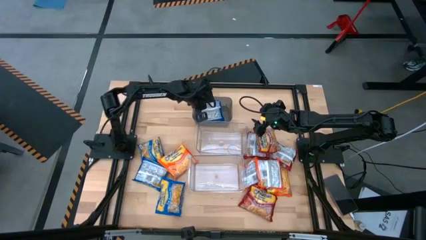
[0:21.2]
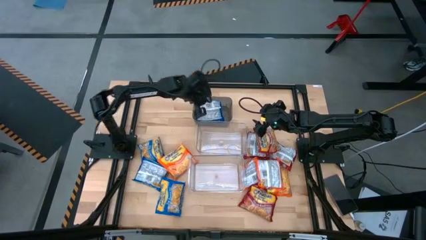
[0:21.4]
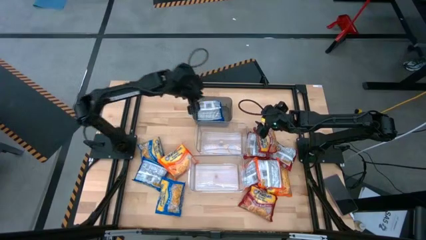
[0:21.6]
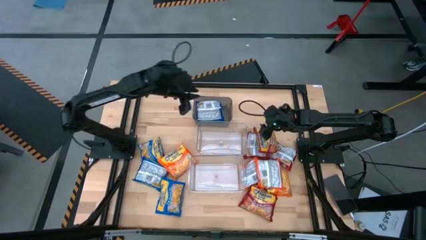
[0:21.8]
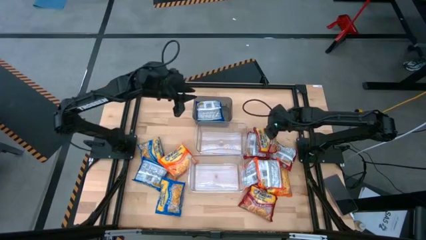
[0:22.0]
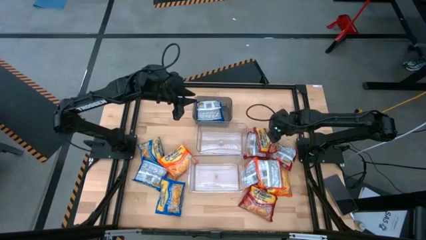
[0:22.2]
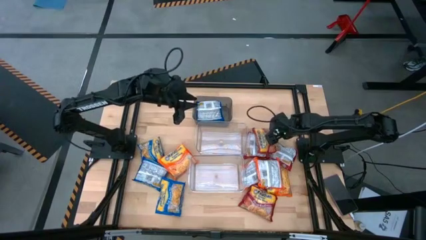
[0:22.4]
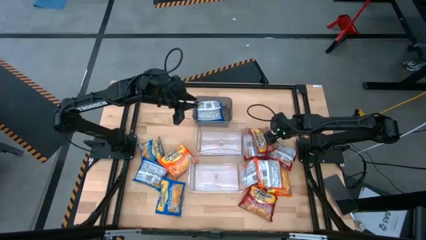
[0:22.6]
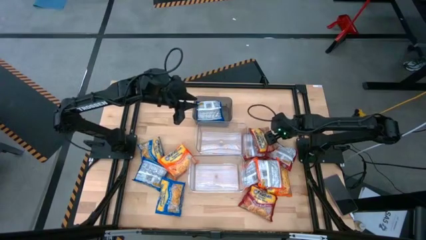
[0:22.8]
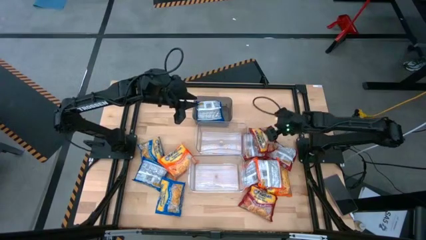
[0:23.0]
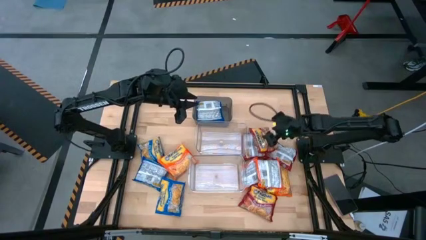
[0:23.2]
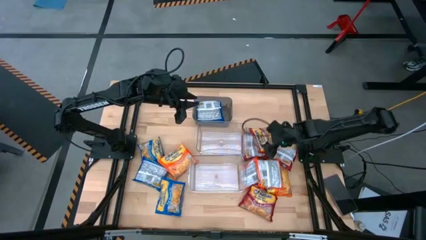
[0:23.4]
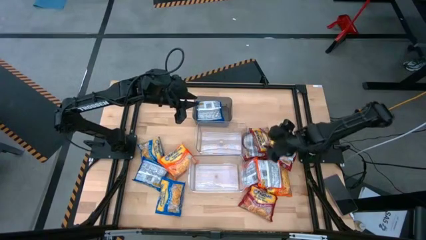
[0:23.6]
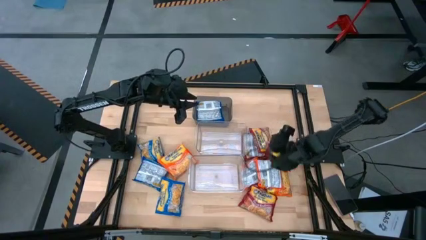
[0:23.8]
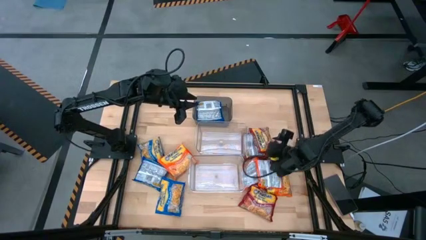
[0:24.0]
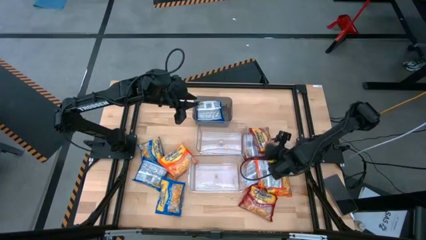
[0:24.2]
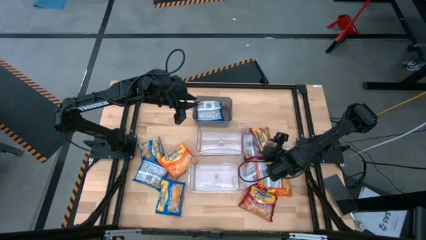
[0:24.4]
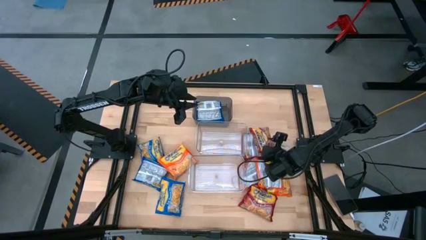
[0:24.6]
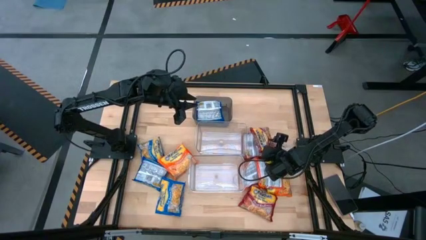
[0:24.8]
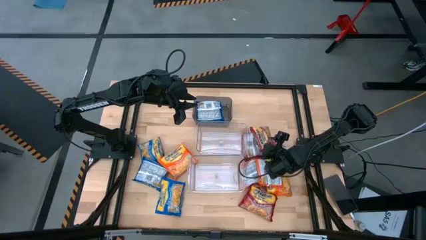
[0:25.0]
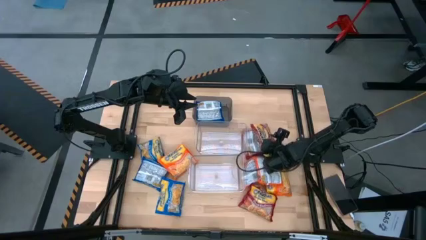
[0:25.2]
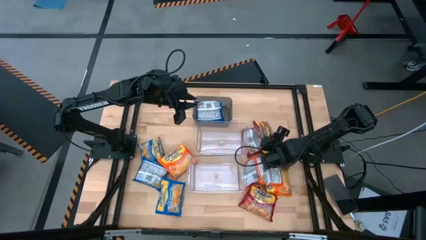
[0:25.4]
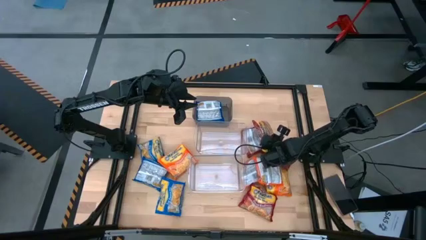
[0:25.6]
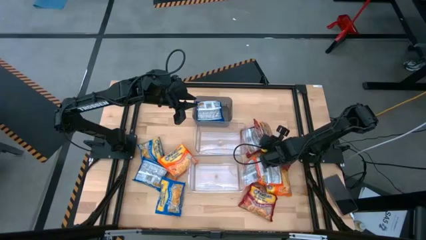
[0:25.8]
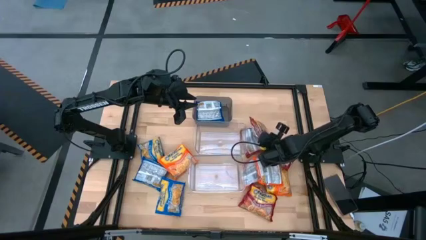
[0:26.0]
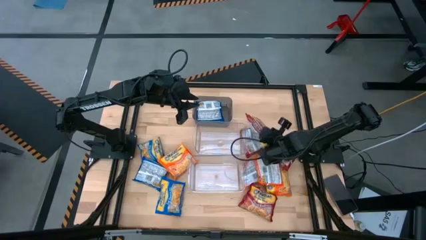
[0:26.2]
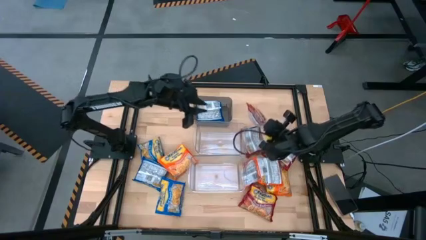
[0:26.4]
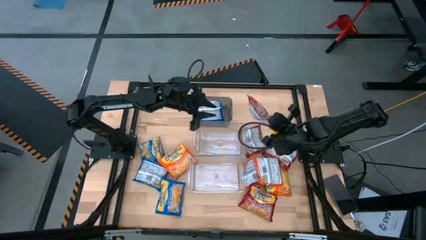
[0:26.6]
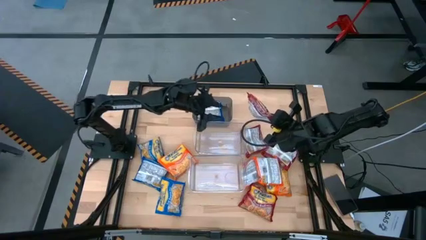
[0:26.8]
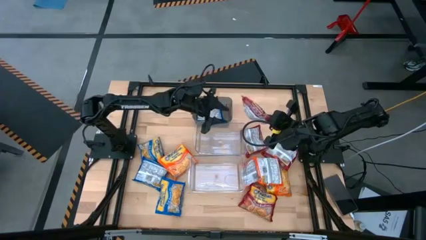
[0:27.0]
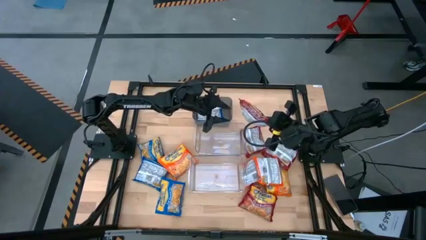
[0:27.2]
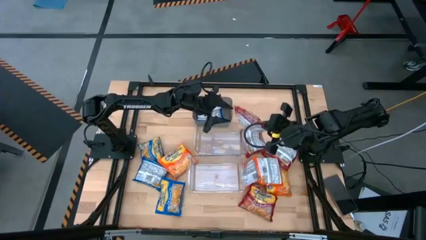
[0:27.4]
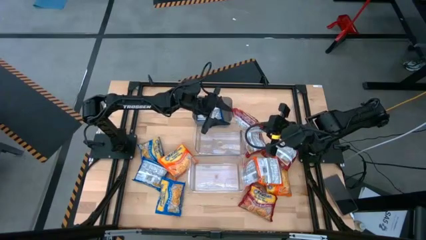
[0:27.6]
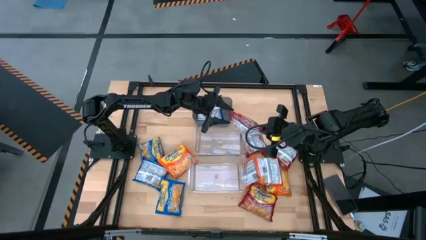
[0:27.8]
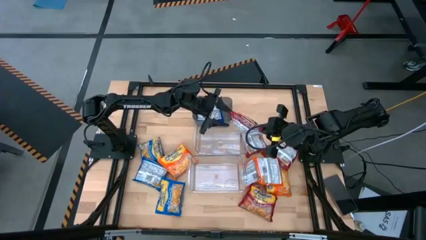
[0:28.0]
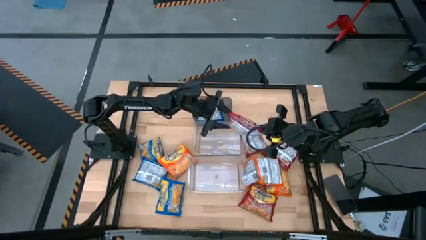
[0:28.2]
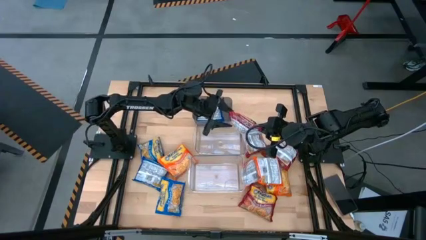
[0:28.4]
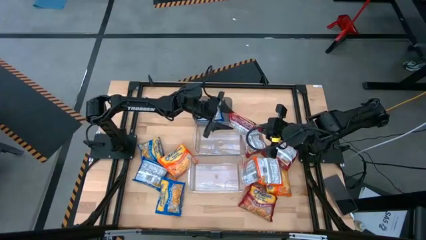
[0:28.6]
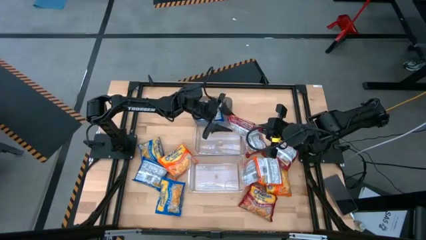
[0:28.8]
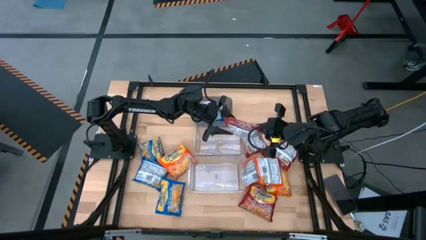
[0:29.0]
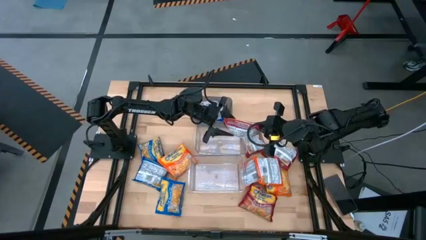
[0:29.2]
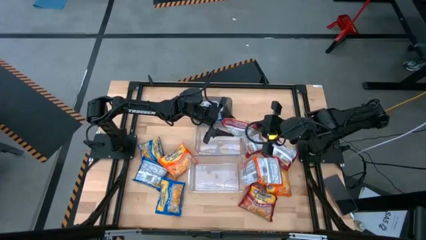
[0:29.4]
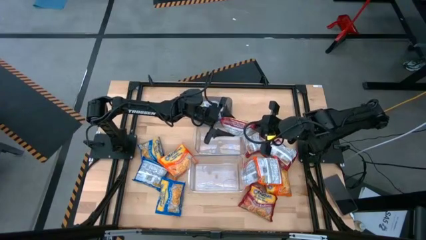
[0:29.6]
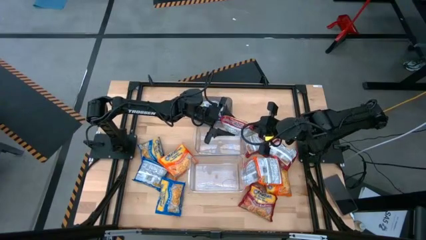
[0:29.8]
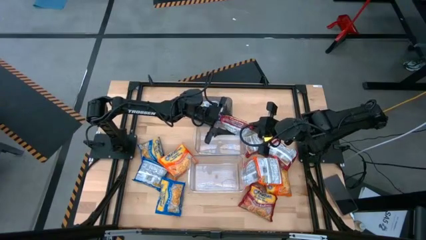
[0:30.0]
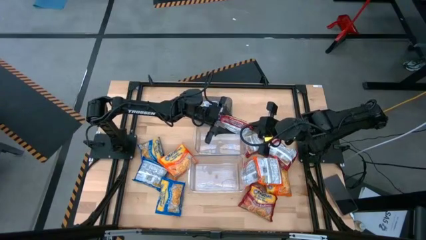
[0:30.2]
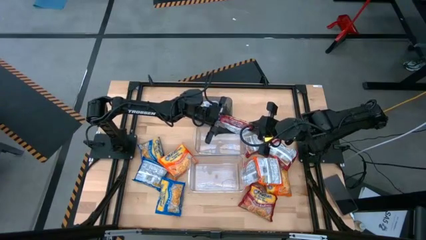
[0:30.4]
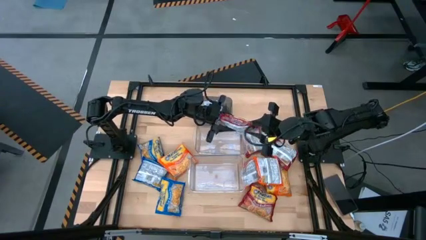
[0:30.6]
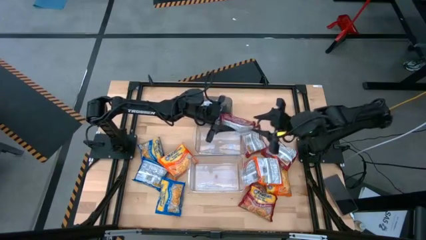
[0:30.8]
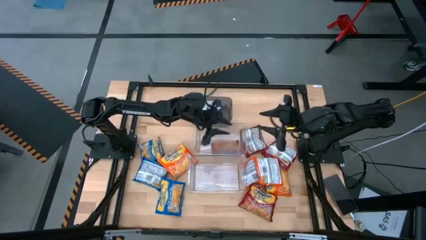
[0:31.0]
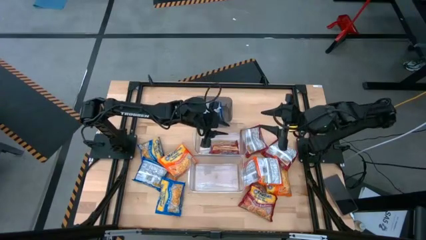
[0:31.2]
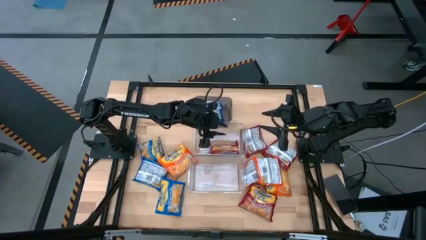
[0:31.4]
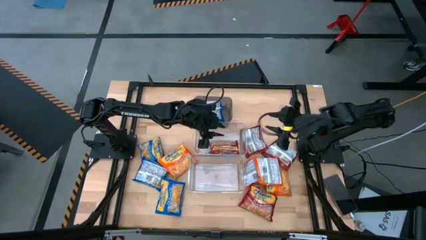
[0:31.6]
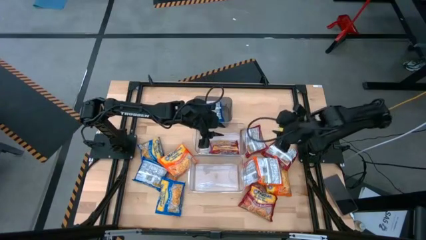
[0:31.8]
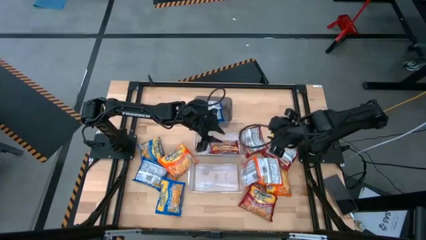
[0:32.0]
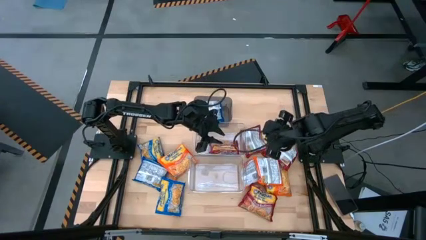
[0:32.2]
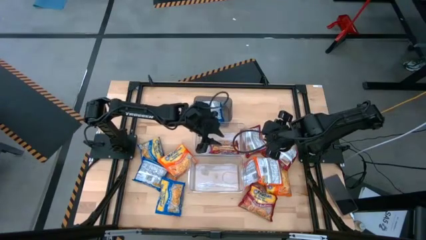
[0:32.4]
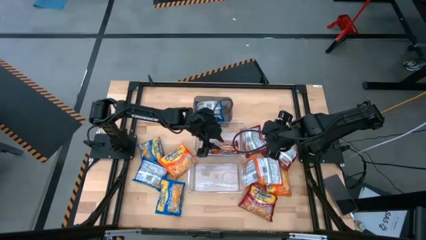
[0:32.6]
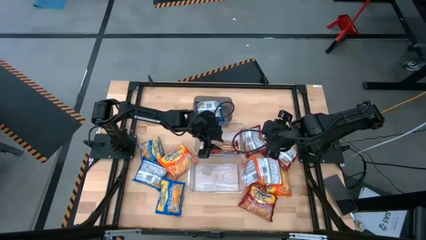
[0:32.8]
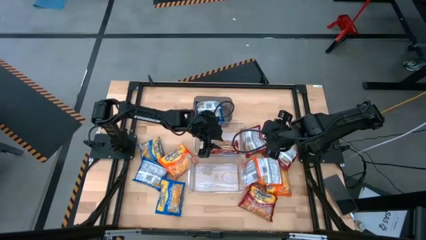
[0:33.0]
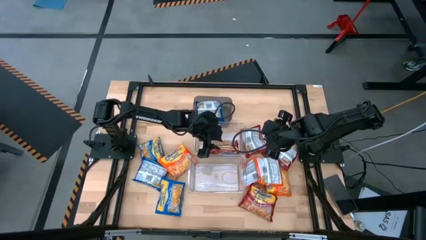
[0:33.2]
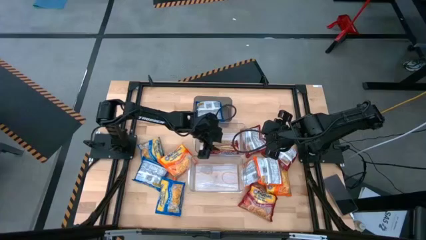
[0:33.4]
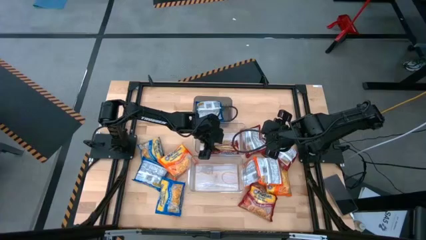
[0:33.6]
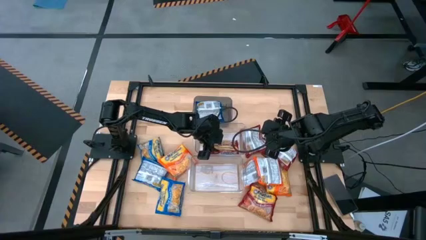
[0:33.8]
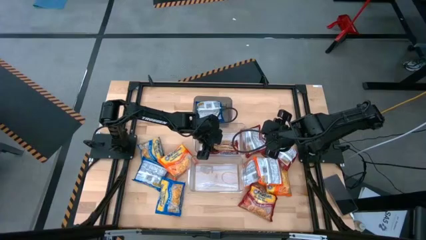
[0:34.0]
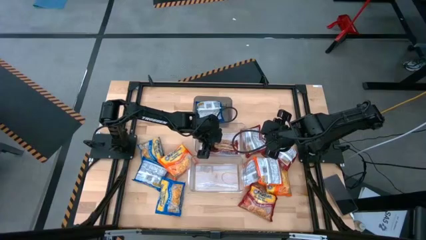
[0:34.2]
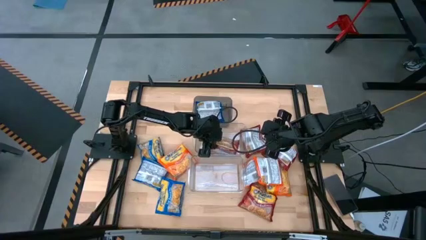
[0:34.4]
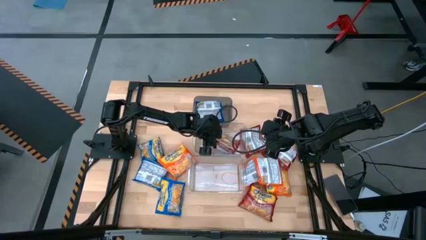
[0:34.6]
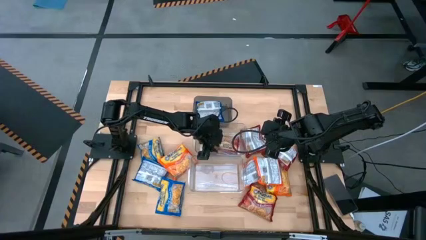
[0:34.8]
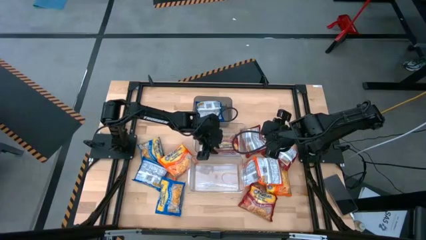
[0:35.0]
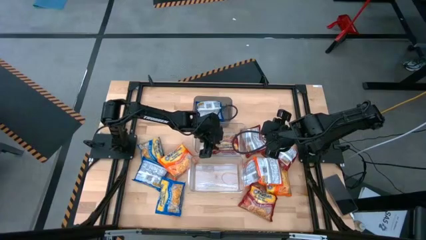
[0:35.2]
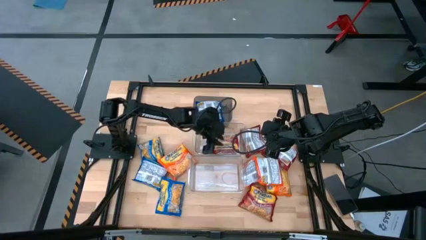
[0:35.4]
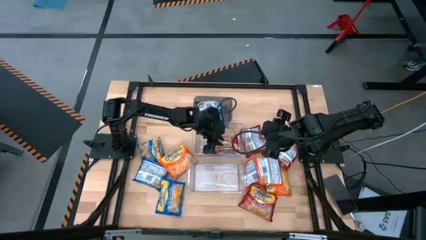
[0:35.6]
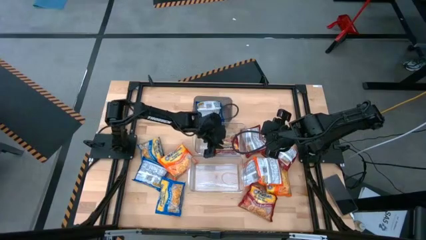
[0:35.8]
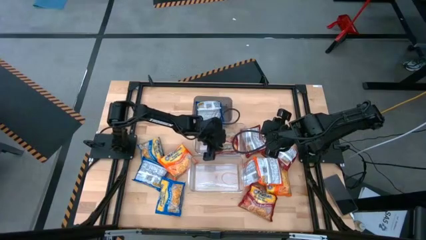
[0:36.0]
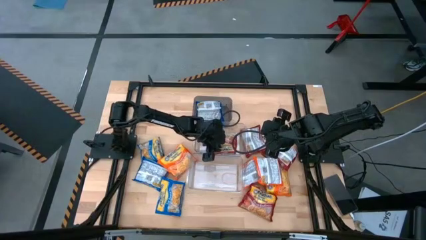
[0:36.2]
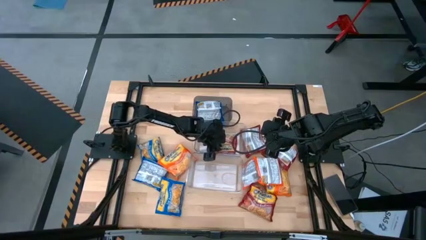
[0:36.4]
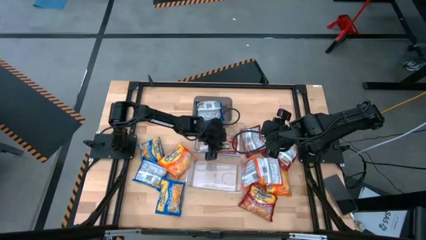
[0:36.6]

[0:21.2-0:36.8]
Task: Sort Maruchan noodles
Put the red noodle pack into the top transparent bin
